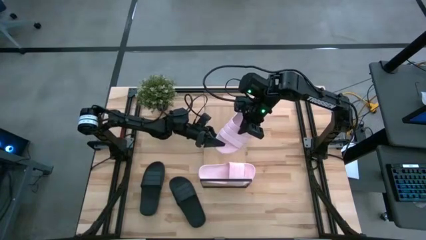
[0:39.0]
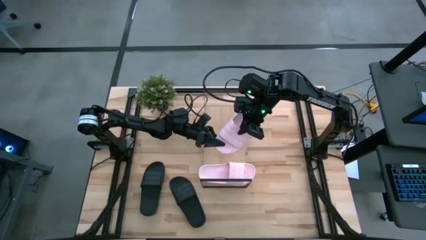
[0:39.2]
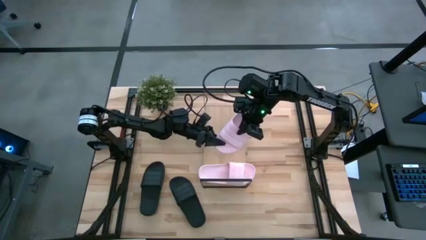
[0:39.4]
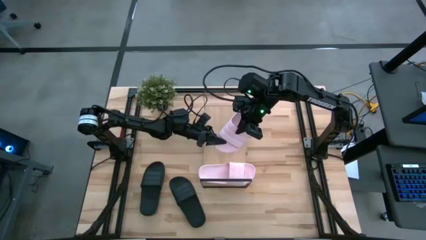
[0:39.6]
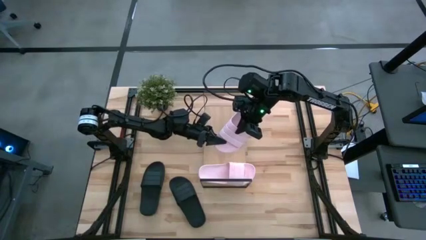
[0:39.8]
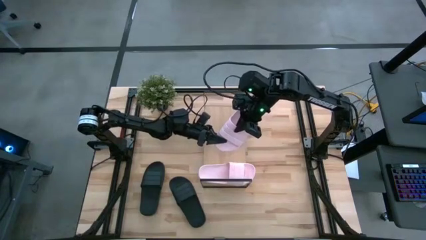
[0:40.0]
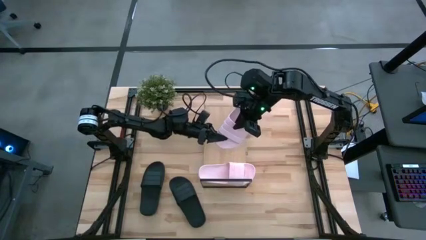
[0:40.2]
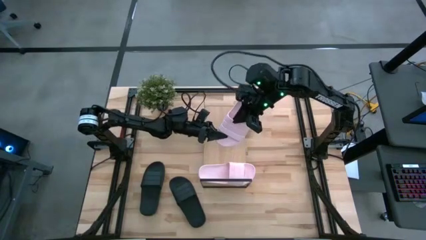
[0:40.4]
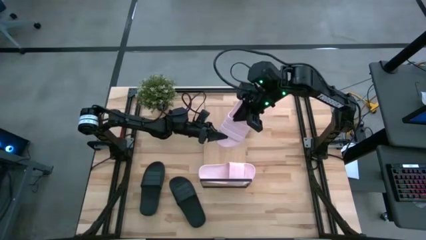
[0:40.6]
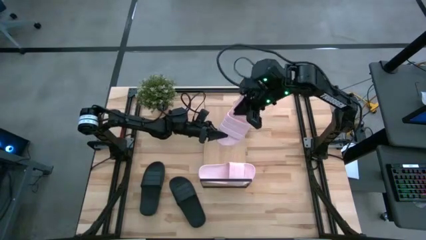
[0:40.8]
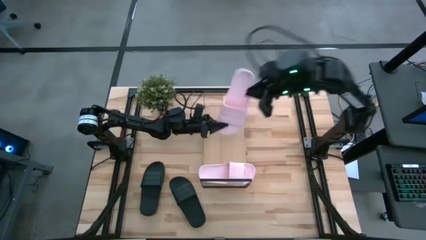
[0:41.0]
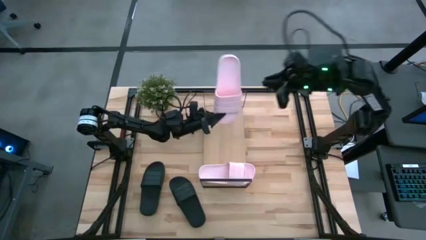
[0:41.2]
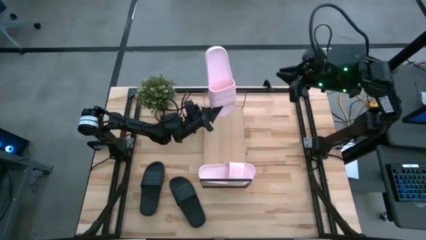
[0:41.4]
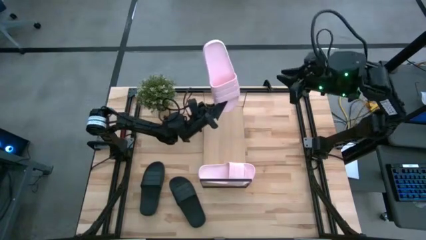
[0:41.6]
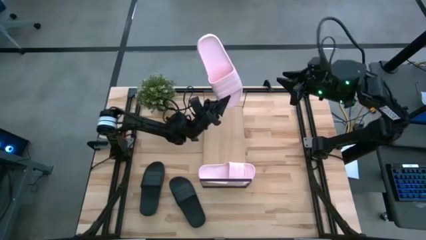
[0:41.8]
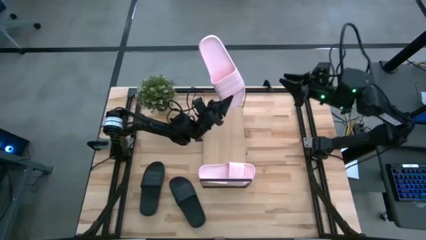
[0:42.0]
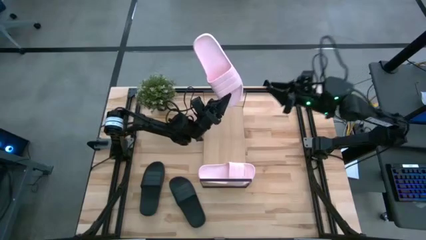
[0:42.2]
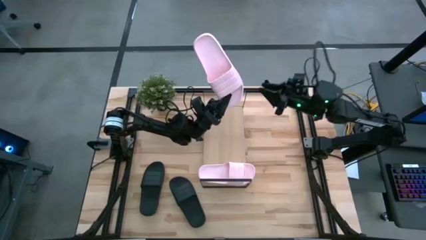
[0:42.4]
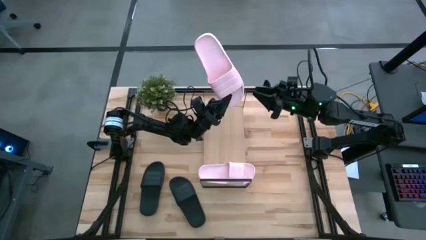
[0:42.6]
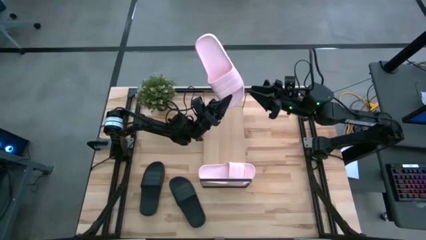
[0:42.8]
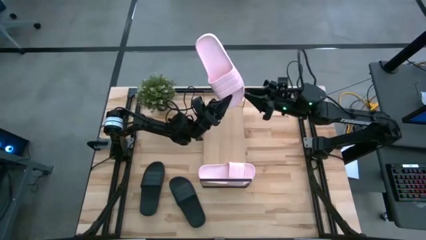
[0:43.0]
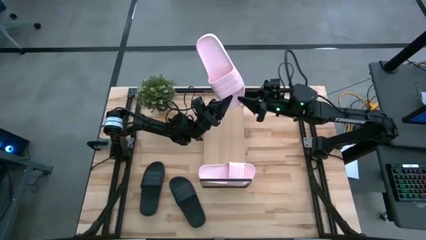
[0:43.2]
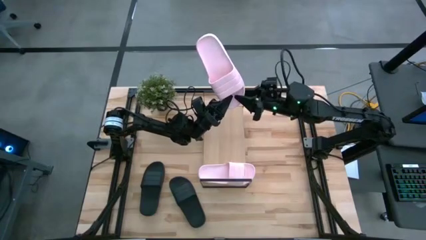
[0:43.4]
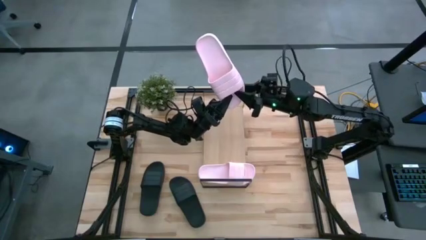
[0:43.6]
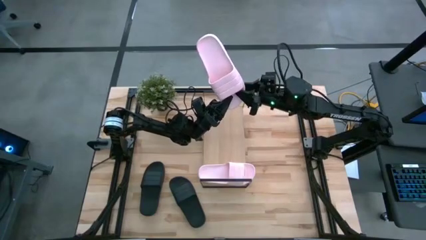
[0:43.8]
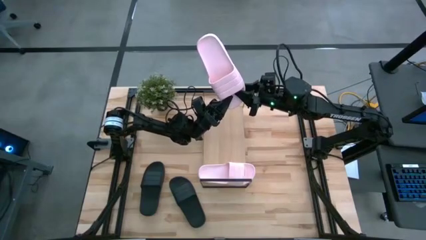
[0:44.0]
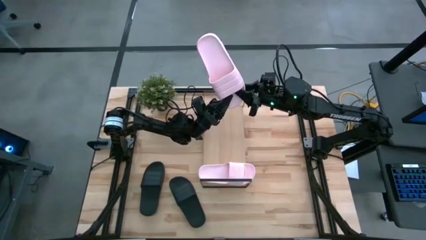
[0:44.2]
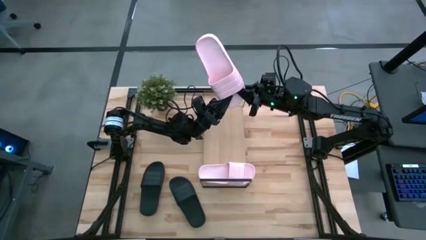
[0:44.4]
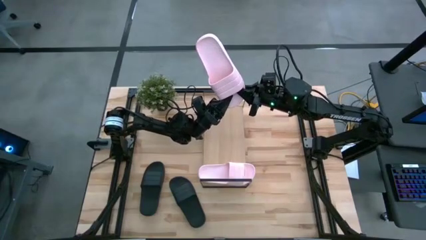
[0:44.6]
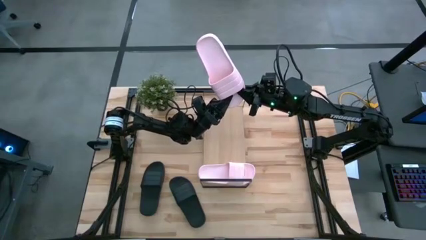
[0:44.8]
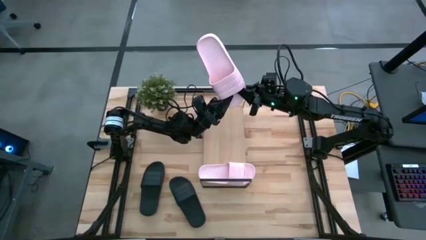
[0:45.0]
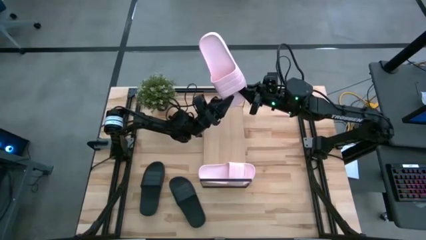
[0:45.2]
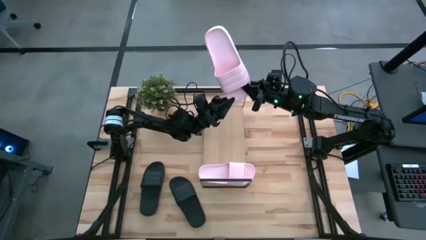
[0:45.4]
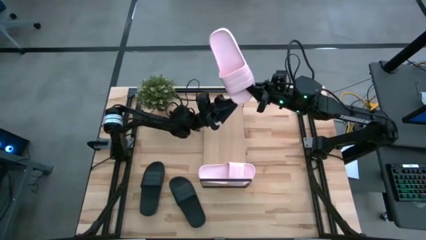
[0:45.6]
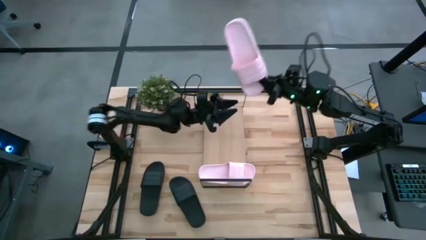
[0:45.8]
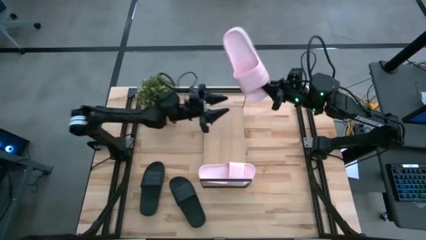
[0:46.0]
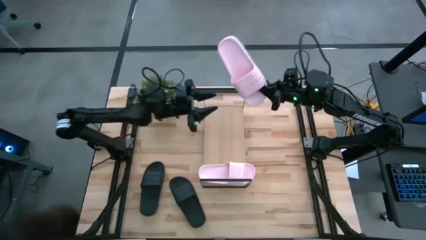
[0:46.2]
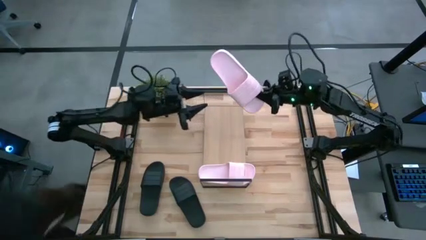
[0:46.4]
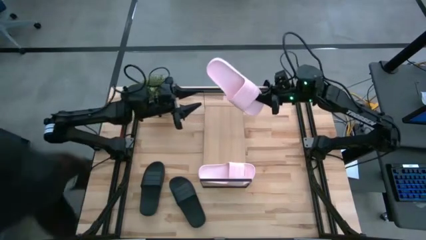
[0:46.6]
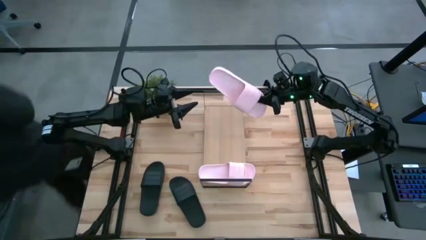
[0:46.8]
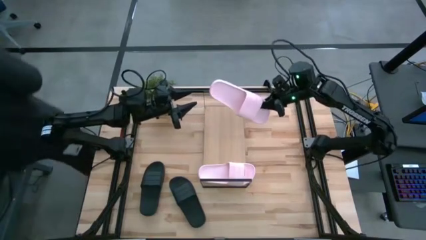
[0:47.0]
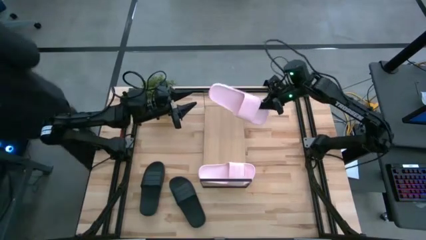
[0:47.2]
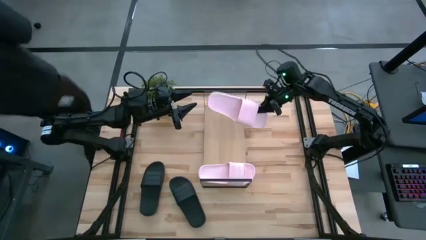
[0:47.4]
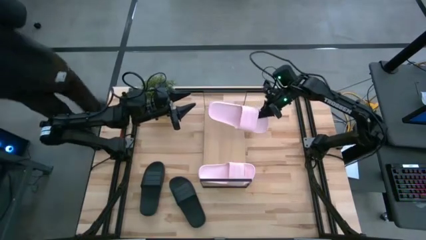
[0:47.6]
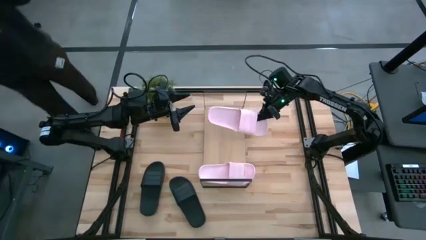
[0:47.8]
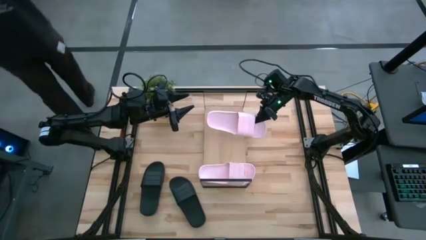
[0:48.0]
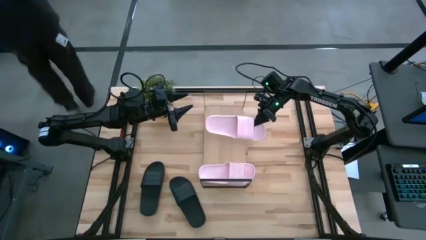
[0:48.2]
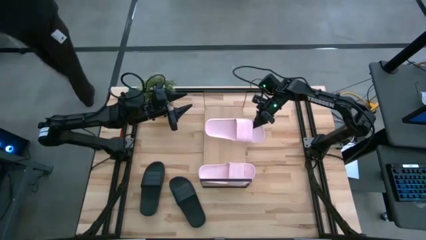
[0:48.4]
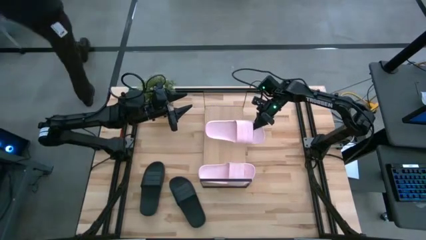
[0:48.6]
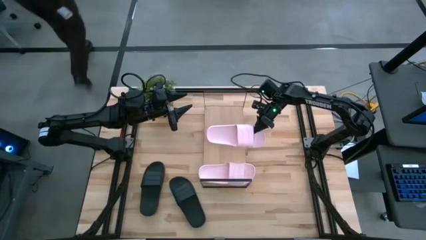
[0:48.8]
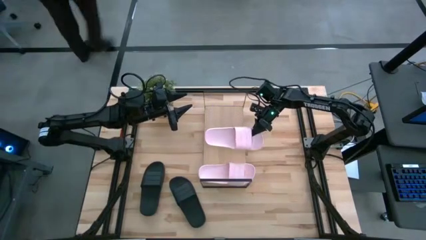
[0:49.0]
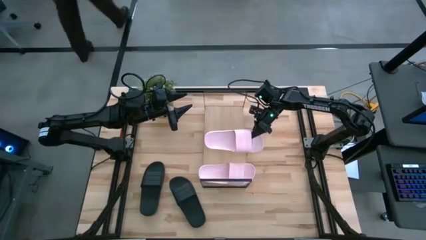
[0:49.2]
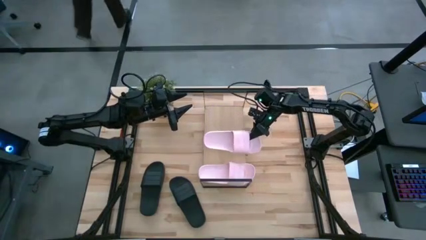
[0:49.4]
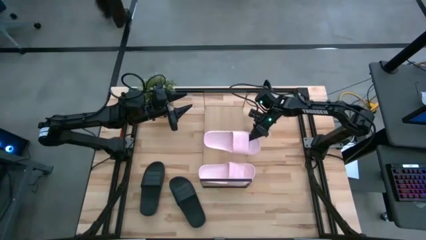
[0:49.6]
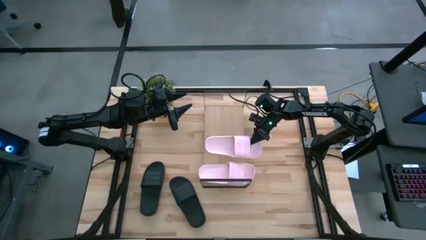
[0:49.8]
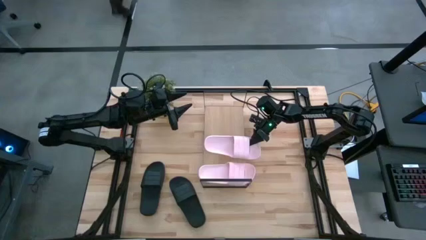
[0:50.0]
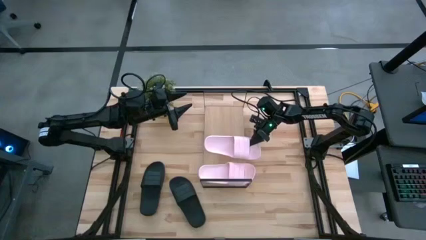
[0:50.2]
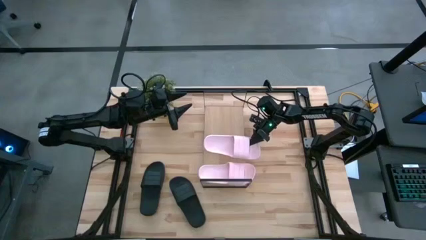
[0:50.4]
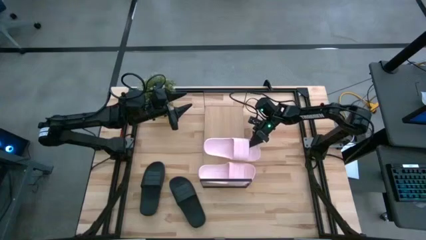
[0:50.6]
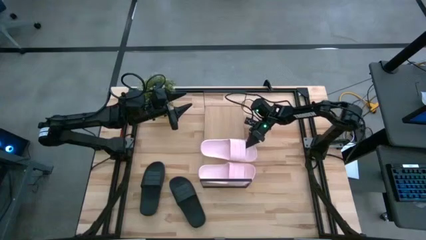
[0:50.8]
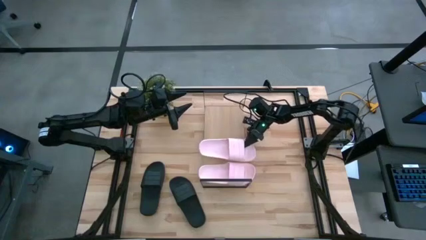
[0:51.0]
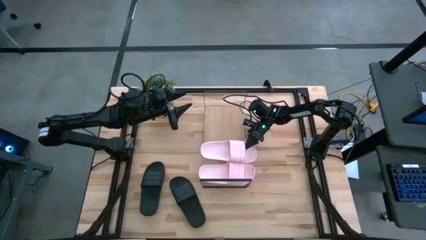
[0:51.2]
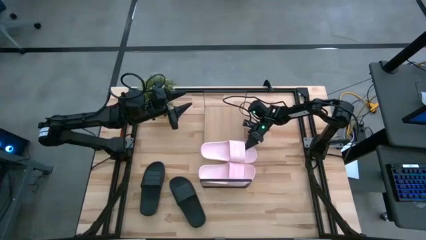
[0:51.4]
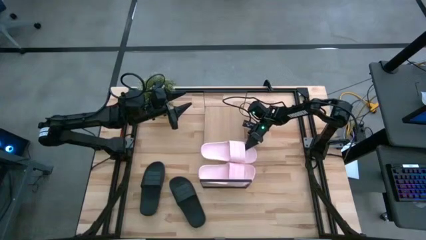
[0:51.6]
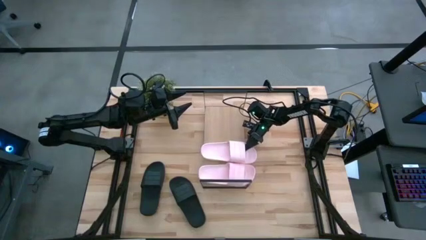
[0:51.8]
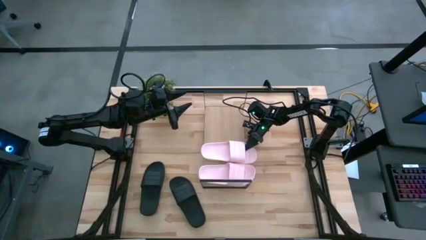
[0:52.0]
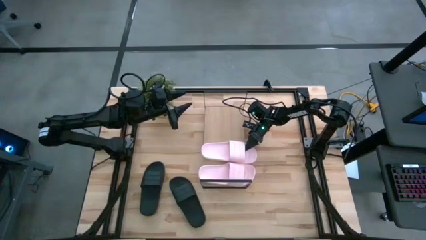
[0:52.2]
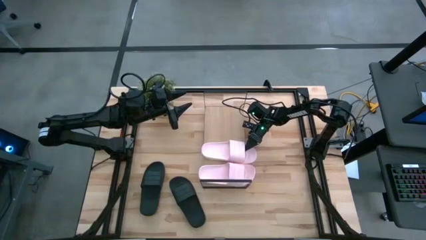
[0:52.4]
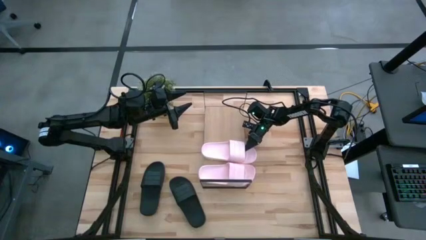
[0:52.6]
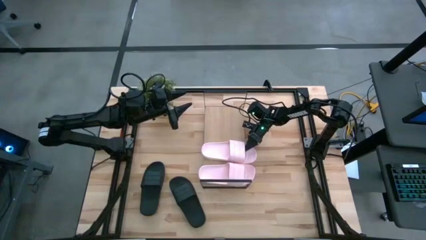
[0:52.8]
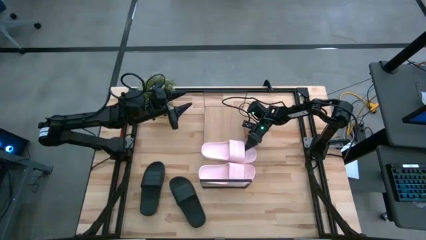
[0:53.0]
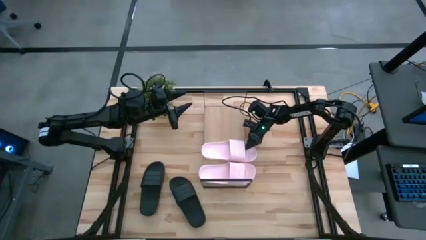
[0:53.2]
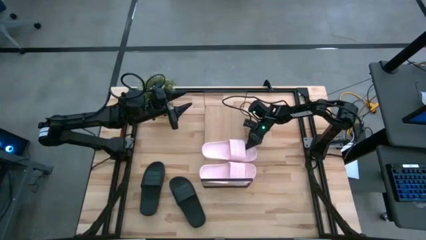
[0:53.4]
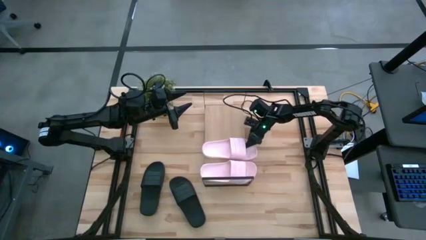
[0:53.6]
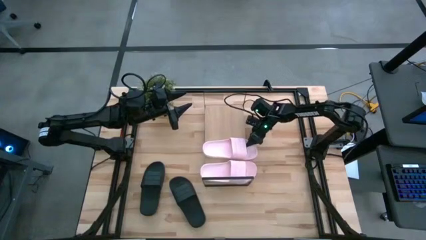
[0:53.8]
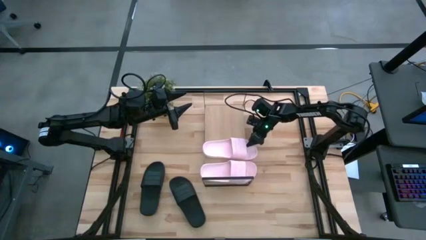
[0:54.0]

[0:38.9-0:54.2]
Task: Pick and place slides into the shelf
Put the pink slide on the shelf
